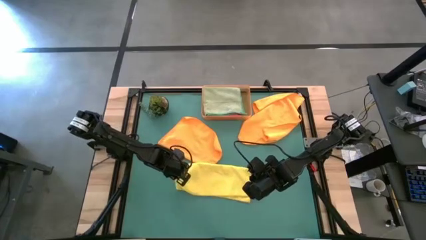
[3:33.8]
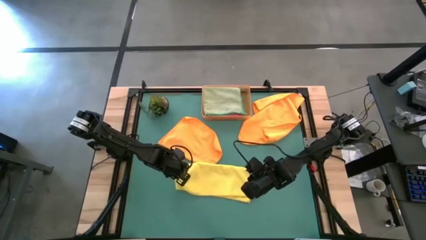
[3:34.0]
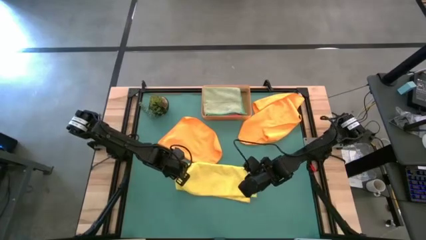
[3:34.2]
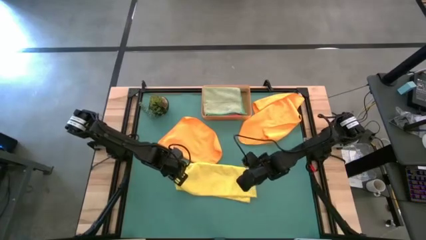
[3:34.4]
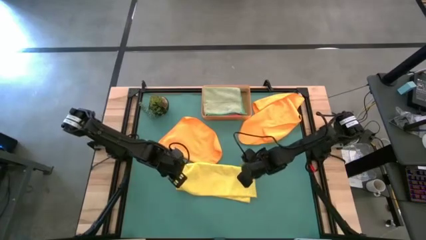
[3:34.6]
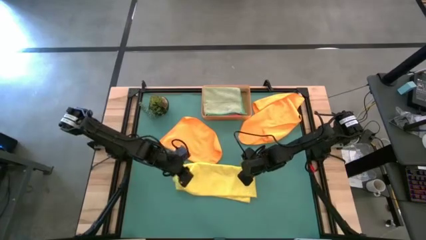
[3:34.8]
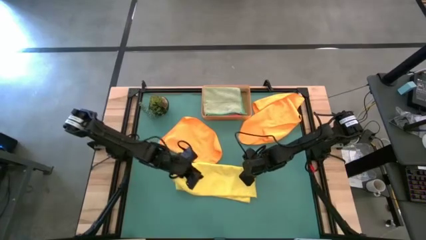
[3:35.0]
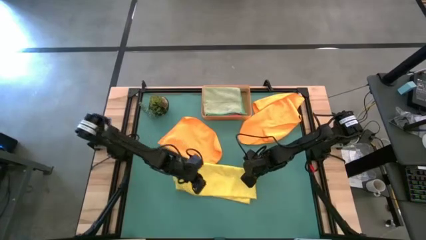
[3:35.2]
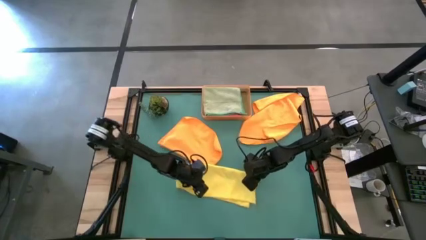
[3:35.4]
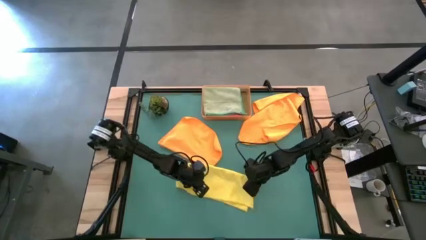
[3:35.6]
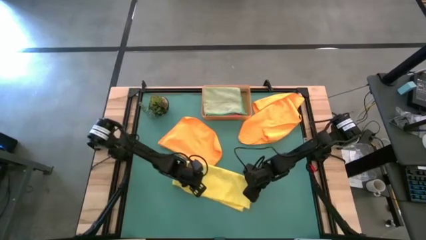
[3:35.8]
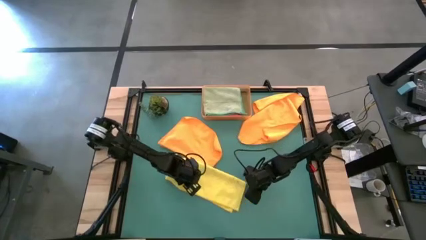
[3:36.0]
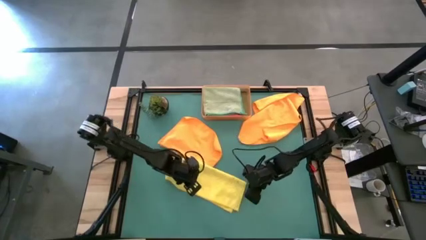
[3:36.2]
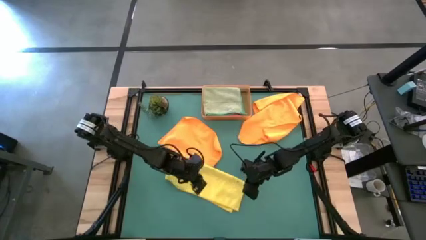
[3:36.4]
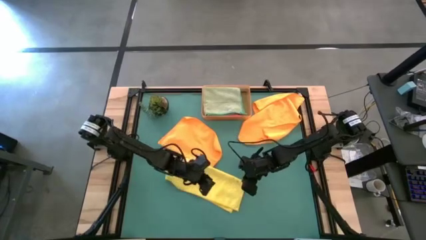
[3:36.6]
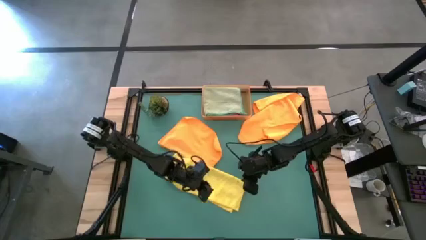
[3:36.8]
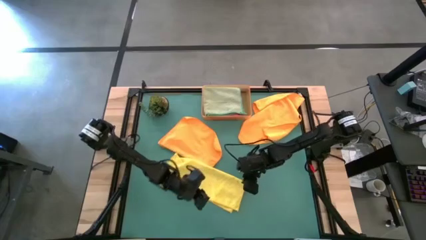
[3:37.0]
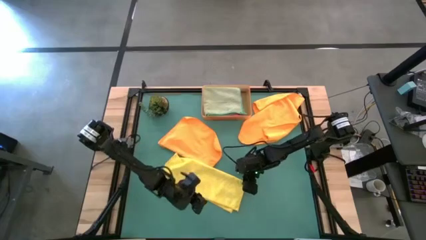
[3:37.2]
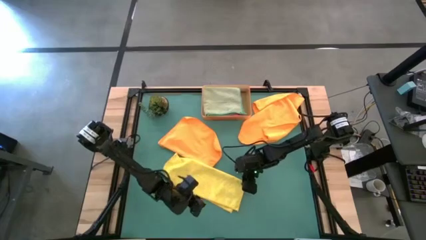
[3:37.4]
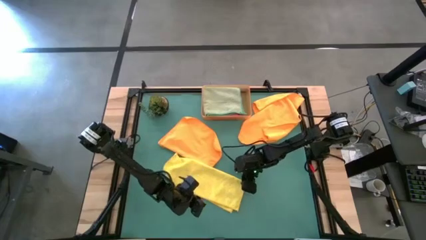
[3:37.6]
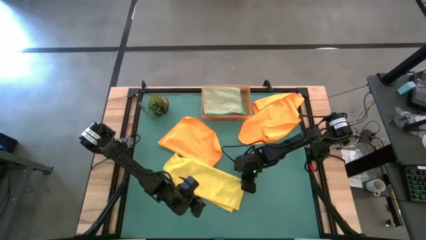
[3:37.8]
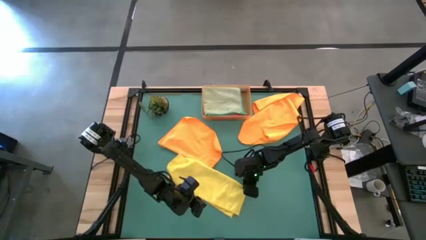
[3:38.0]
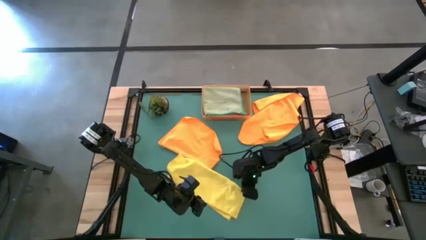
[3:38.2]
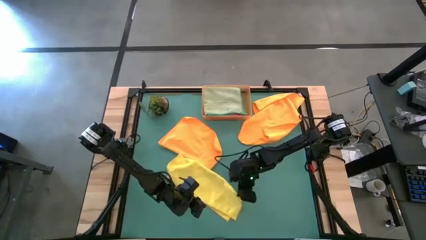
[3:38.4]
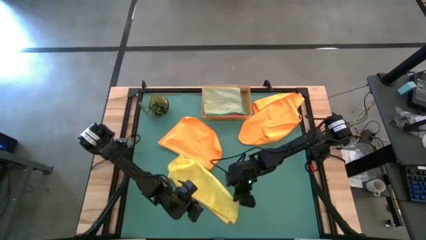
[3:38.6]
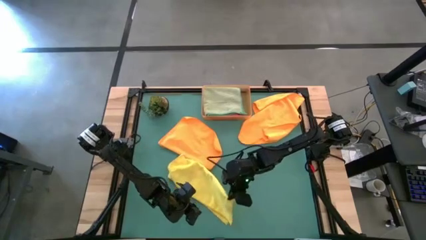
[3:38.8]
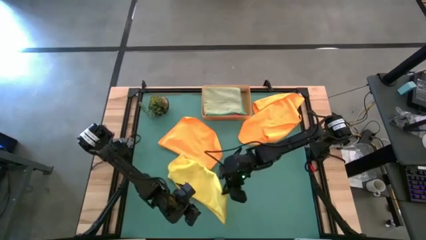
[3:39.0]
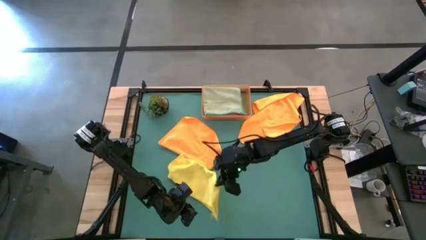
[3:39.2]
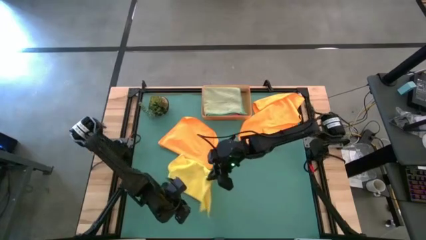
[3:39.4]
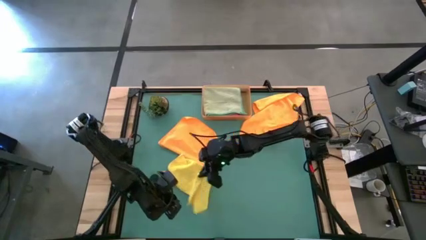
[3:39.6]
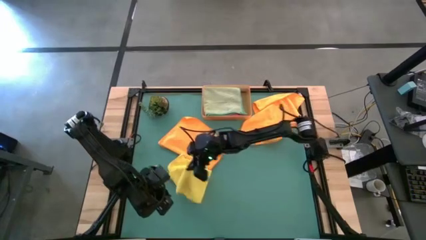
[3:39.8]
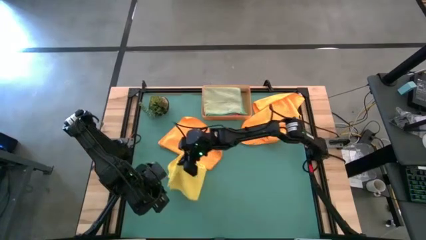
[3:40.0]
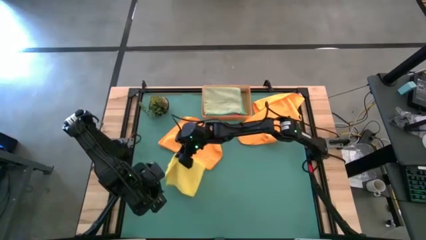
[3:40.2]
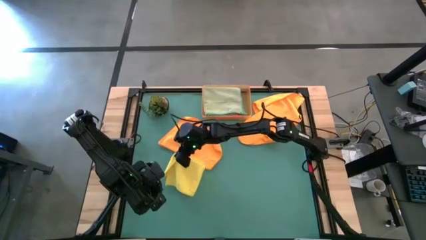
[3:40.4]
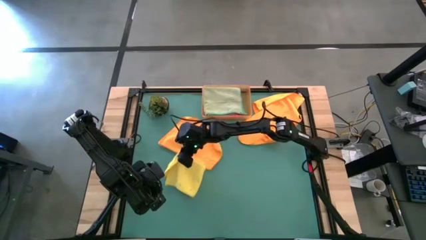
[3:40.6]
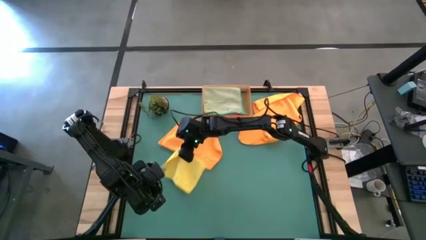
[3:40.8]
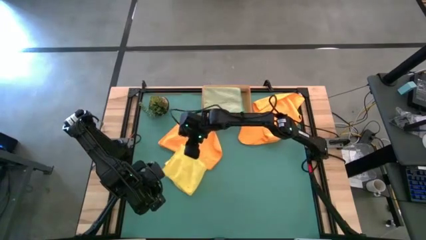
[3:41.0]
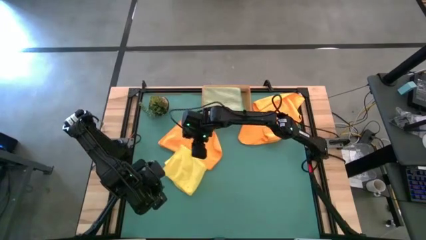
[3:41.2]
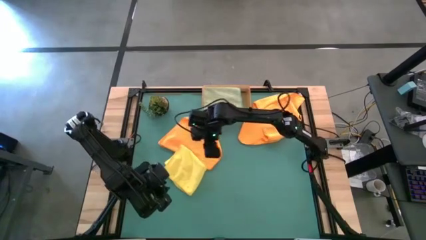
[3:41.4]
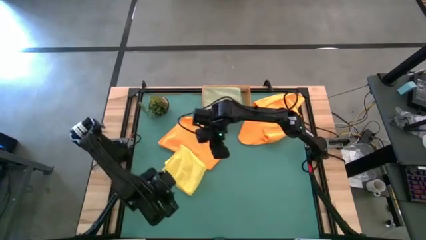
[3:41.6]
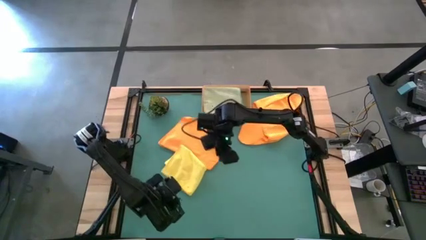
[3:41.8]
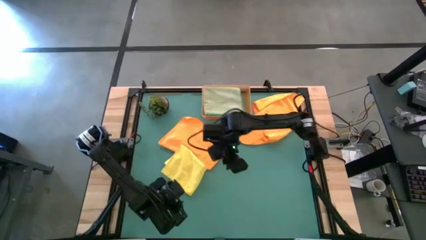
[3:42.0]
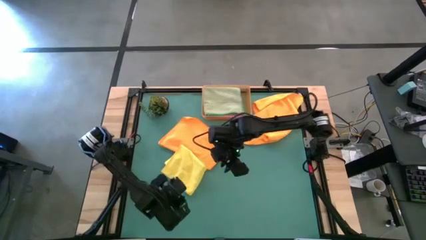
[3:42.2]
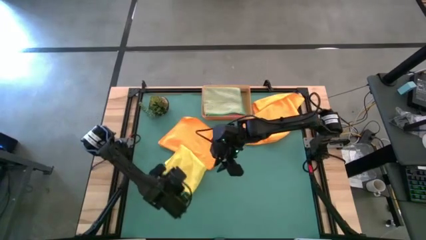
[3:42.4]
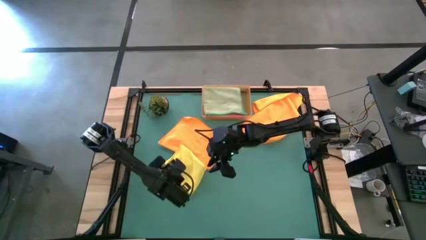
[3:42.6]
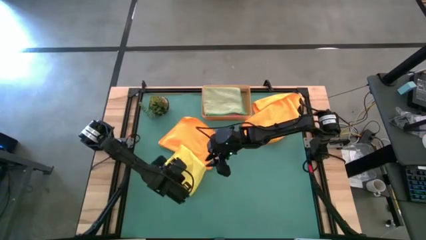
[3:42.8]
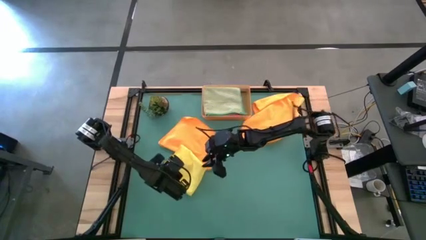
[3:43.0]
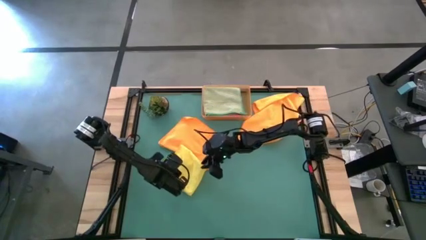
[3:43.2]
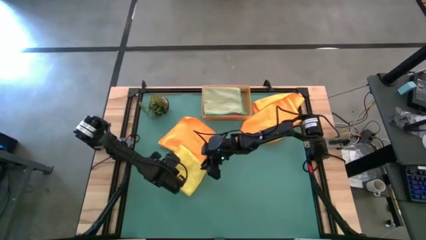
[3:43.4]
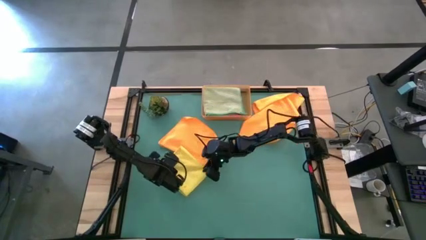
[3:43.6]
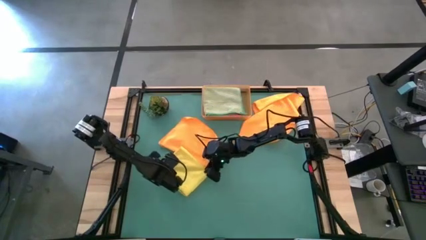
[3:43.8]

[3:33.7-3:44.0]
Task: Fold microfiber towels
Fold the yellow microfiber towel

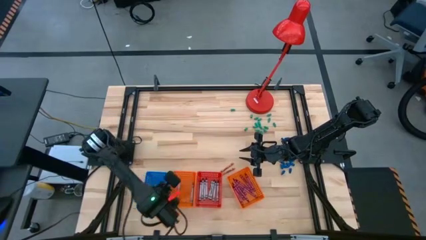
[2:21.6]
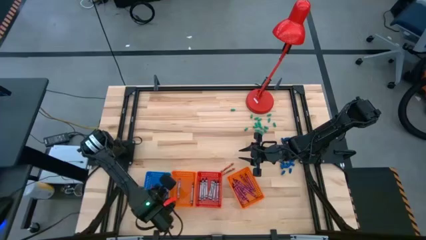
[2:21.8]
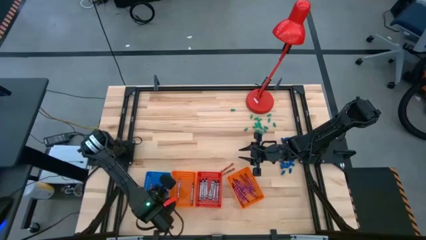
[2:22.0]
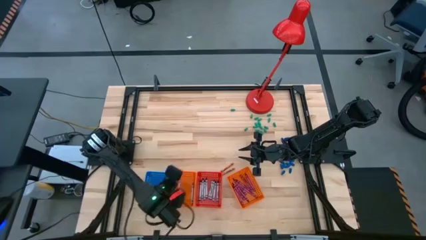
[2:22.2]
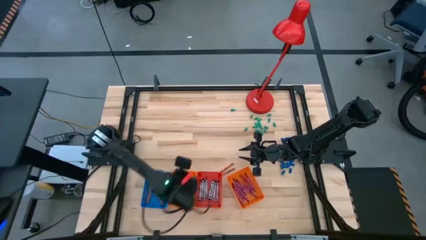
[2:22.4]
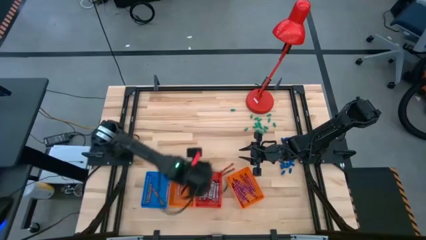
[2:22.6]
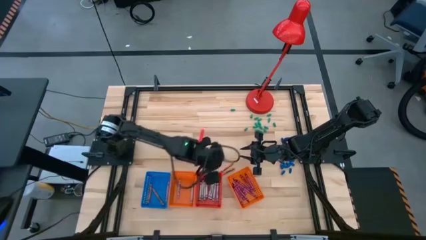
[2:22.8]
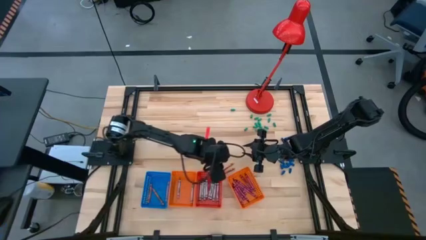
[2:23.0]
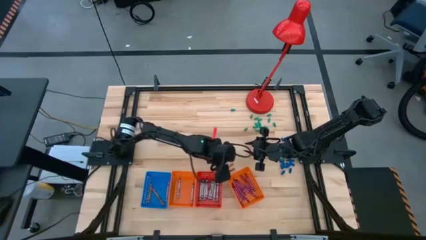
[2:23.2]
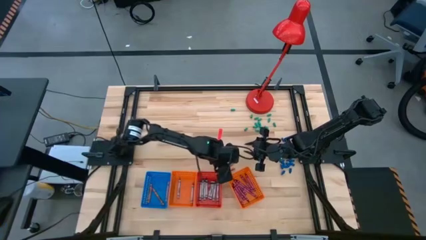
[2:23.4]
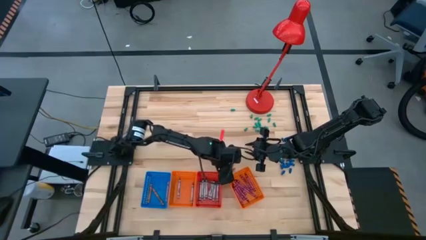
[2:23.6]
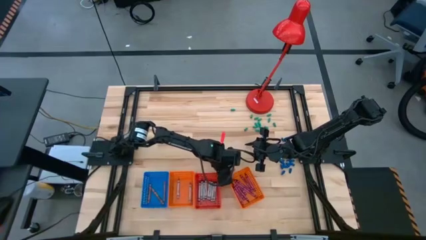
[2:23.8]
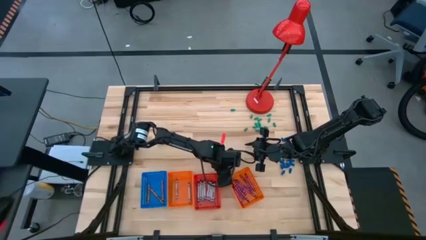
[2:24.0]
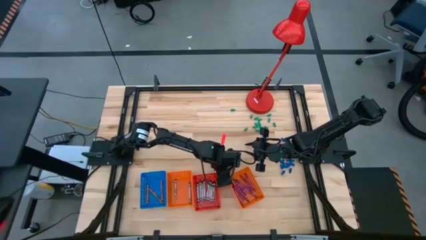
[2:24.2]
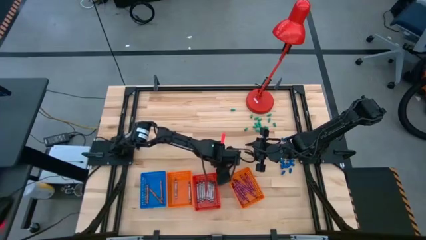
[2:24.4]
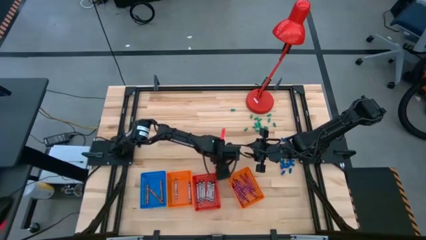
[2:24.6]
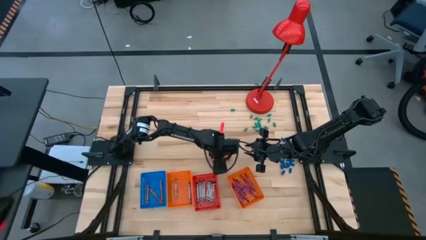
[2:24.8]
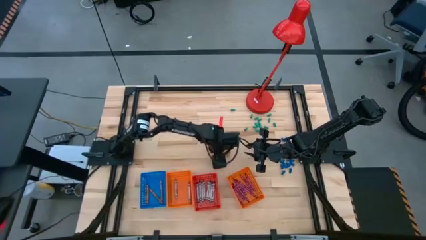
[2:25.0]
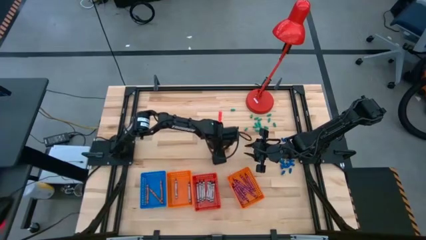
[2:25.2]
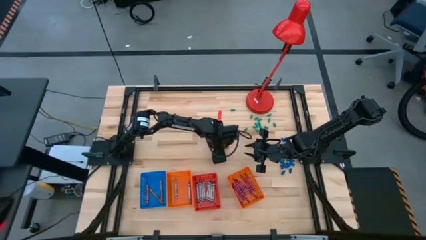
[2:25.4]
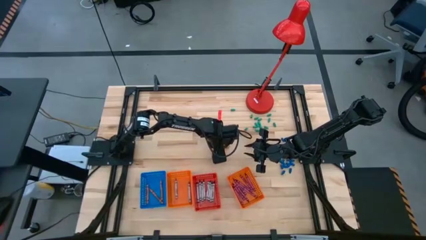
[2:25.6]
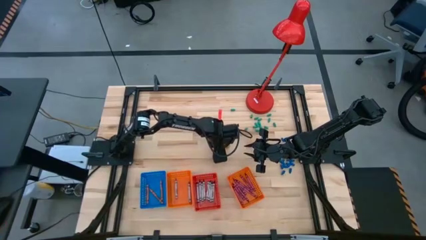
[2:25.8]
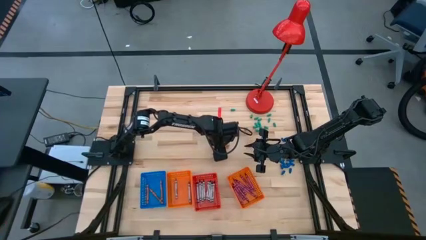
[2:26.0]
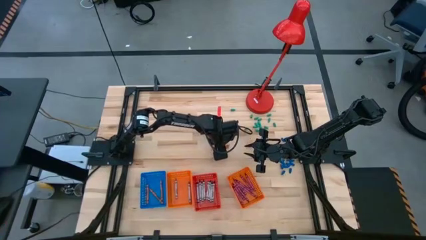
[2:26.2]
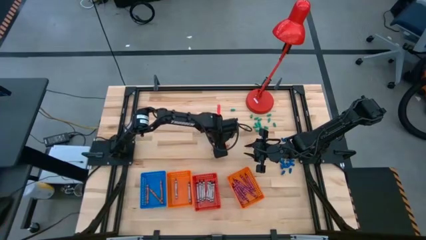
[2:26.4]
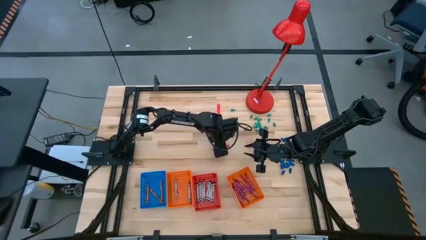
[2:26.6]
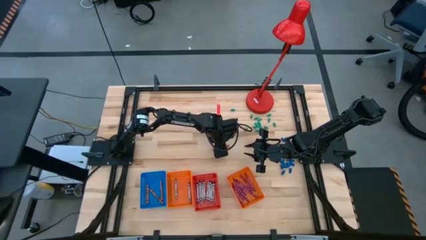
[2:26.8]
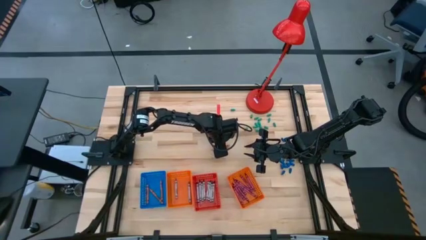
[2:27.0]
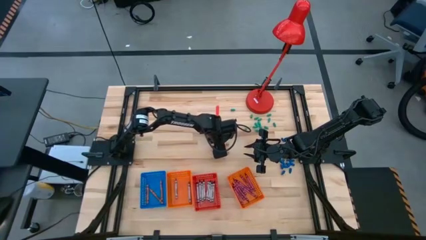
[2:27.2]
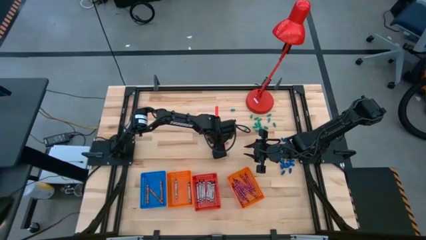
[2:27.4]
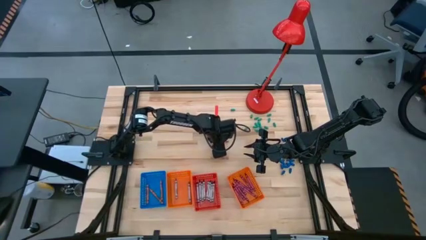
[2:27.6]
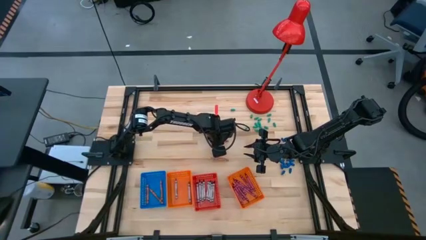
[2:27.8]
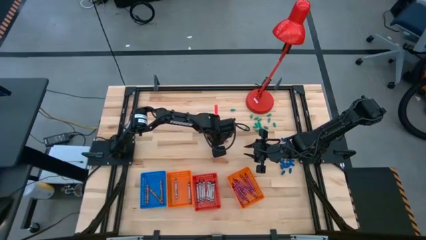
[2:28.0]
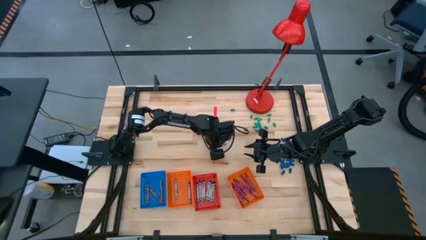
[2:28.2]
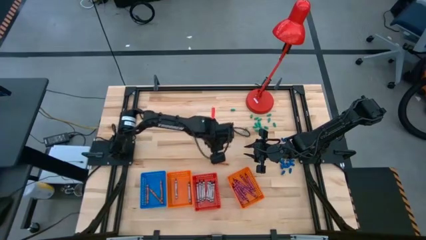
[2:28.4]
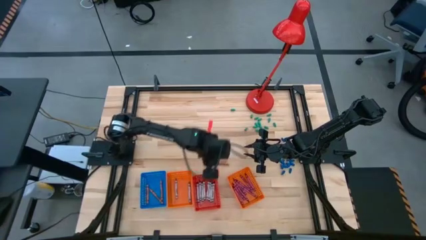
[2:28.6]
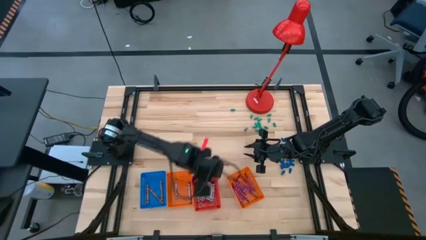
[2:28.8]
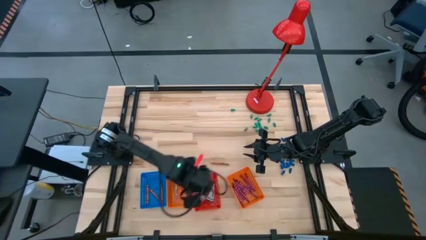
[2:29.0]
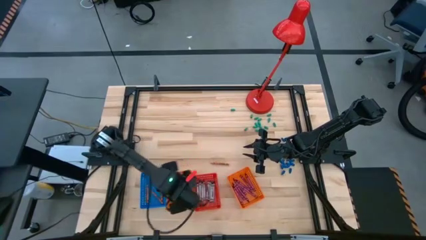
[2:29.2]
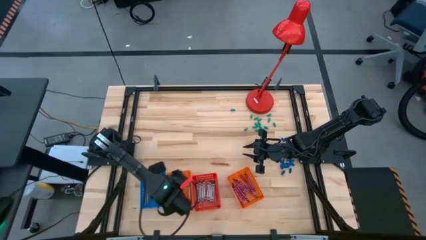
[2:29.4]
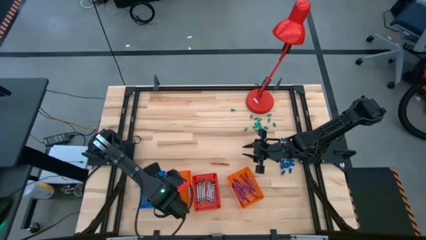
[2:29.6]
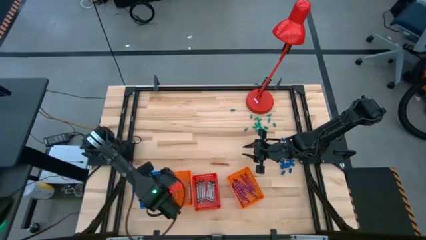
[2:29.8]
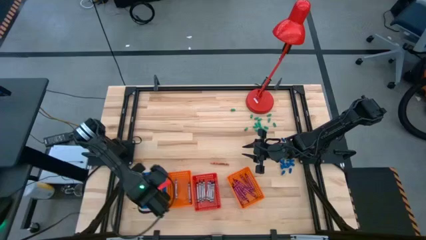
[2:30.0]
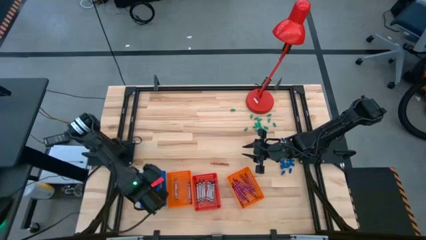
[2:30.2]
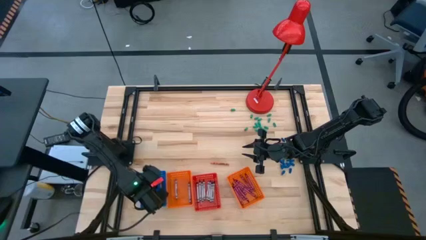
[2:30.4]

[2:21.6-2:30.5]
Task: Sort crayons
Put the orange crayon into the blue bin
